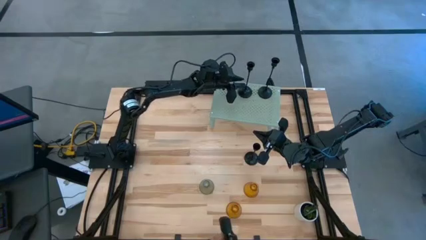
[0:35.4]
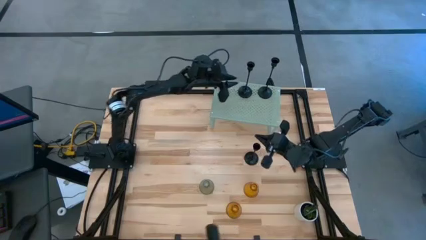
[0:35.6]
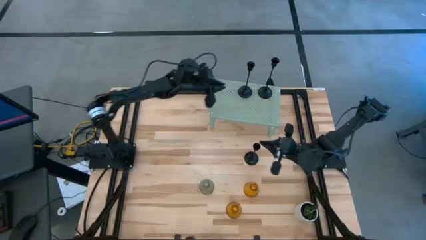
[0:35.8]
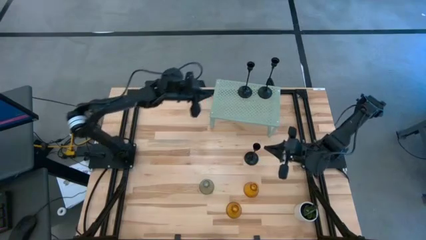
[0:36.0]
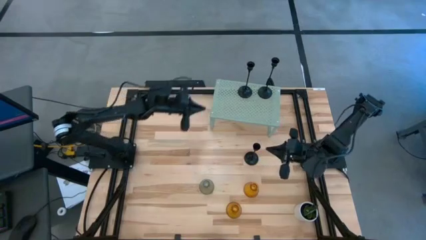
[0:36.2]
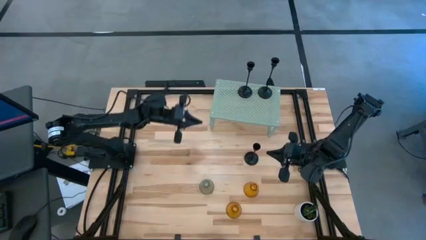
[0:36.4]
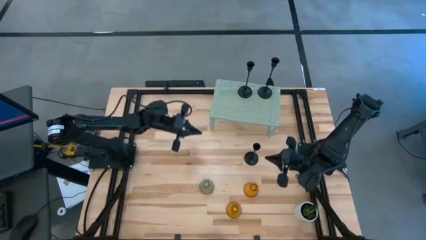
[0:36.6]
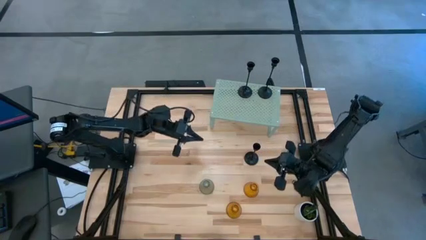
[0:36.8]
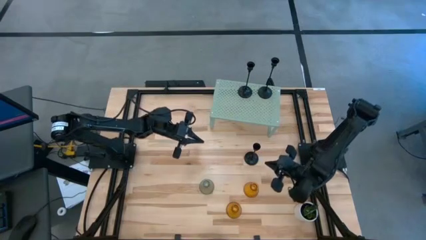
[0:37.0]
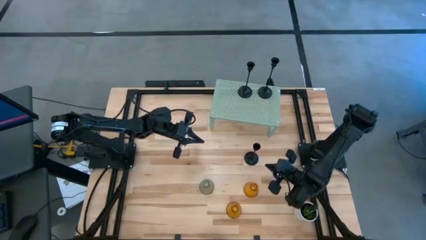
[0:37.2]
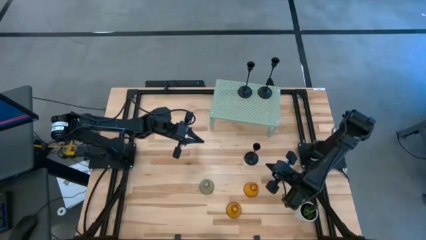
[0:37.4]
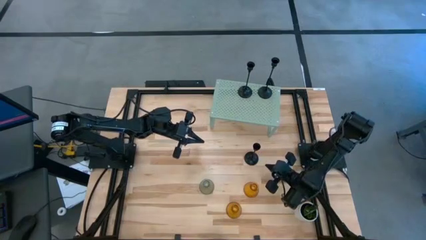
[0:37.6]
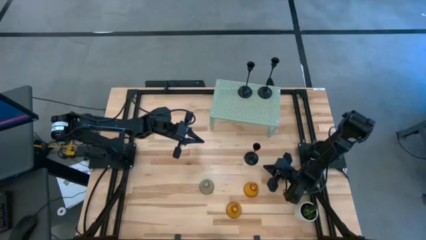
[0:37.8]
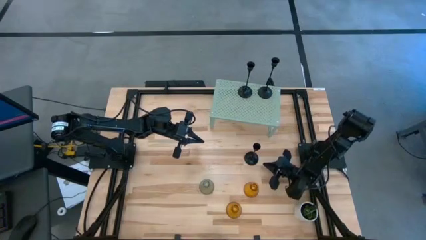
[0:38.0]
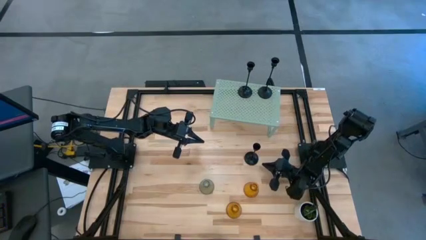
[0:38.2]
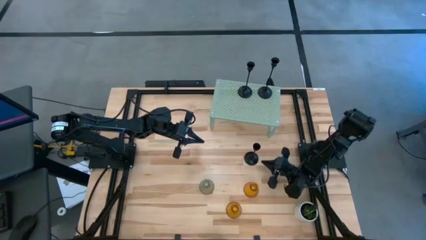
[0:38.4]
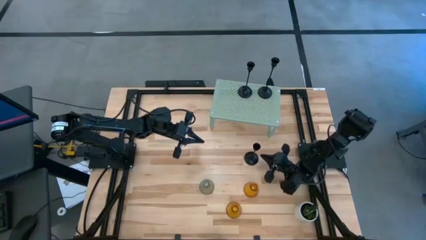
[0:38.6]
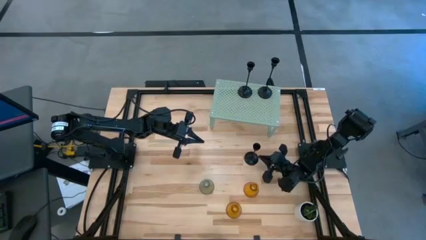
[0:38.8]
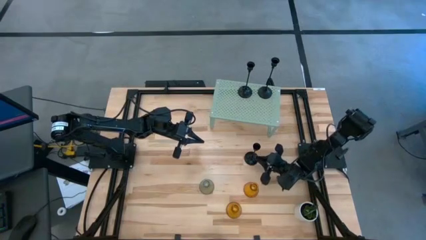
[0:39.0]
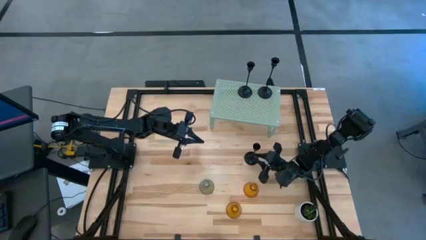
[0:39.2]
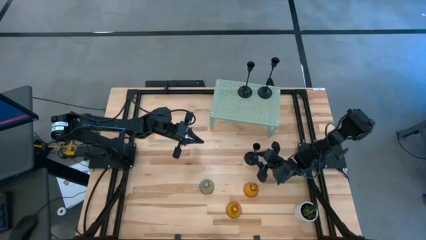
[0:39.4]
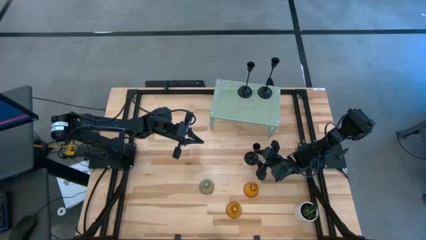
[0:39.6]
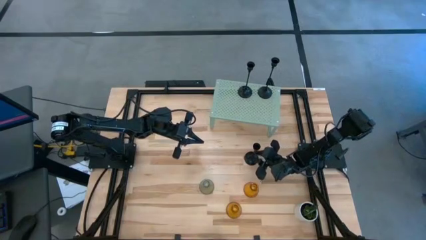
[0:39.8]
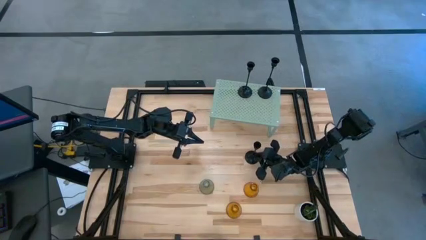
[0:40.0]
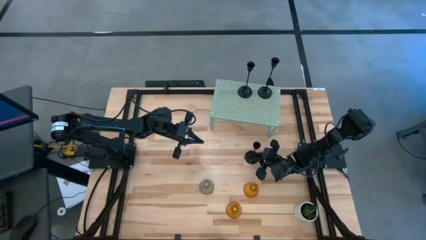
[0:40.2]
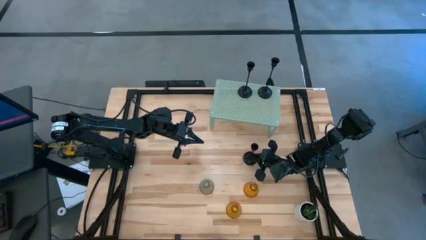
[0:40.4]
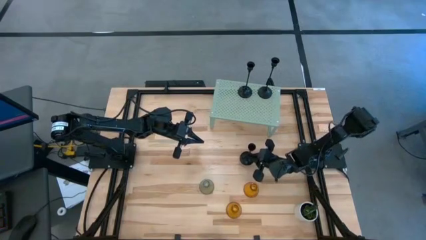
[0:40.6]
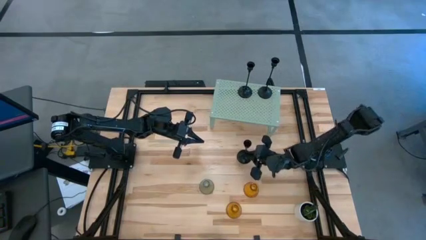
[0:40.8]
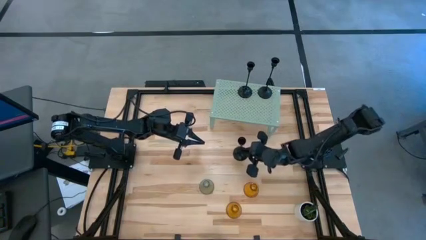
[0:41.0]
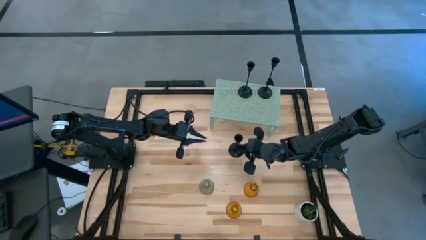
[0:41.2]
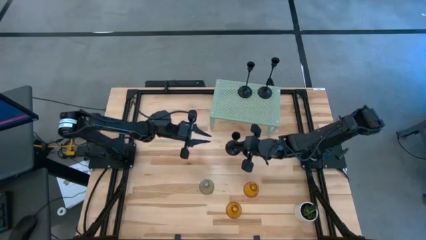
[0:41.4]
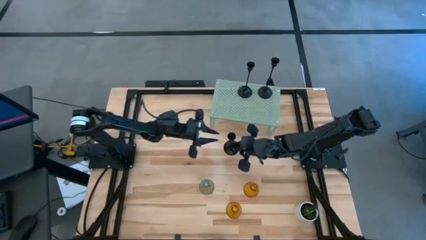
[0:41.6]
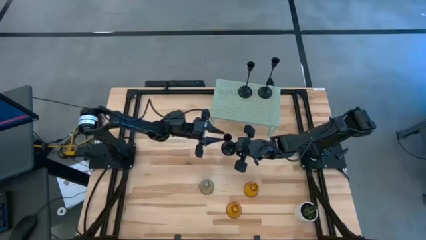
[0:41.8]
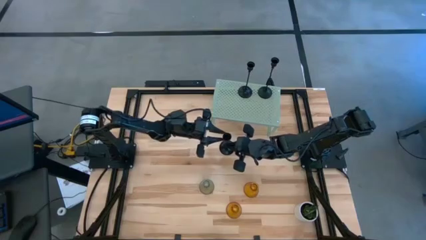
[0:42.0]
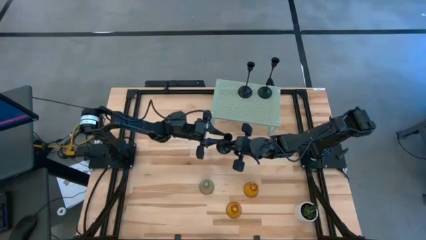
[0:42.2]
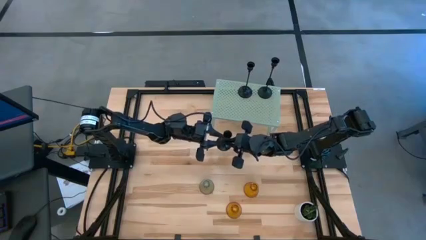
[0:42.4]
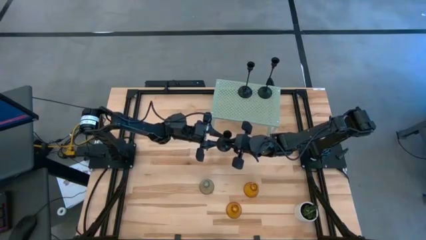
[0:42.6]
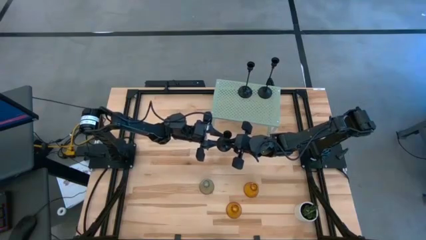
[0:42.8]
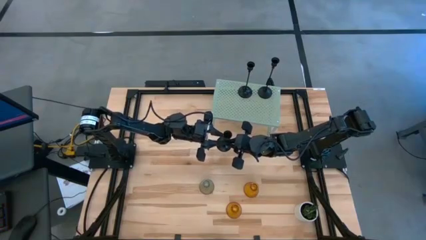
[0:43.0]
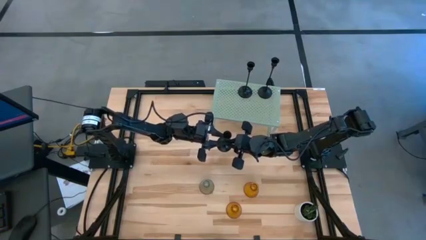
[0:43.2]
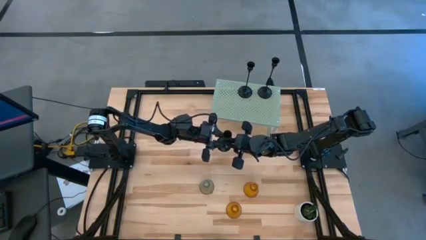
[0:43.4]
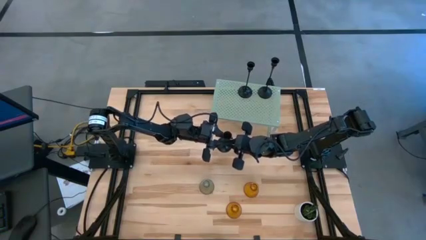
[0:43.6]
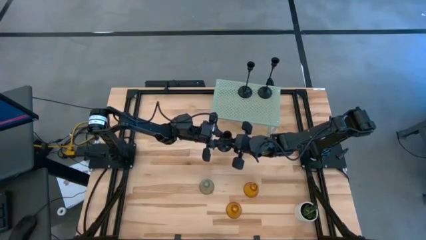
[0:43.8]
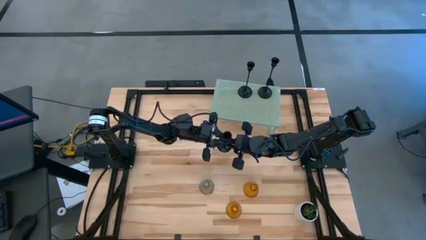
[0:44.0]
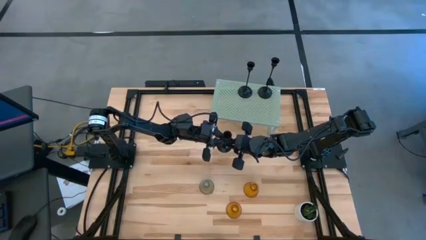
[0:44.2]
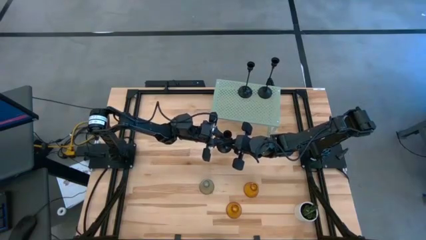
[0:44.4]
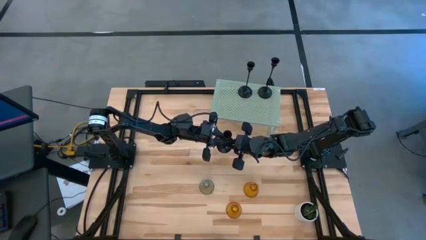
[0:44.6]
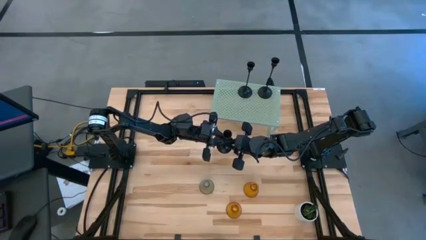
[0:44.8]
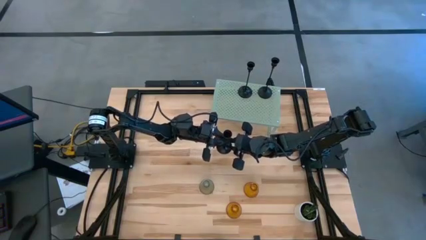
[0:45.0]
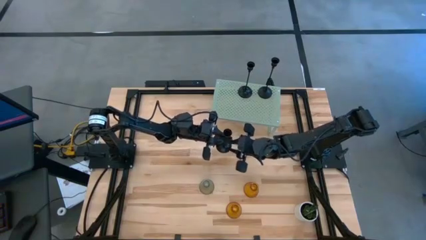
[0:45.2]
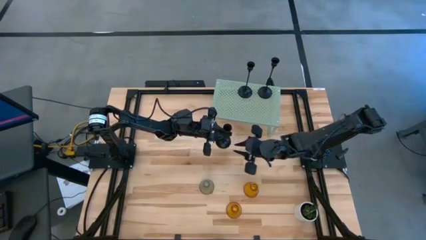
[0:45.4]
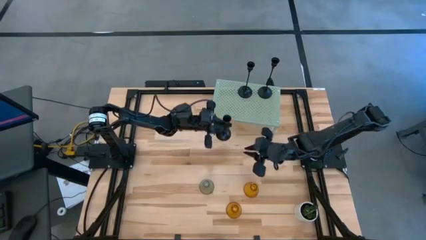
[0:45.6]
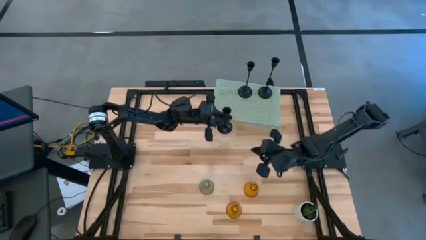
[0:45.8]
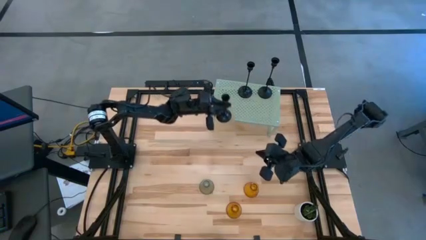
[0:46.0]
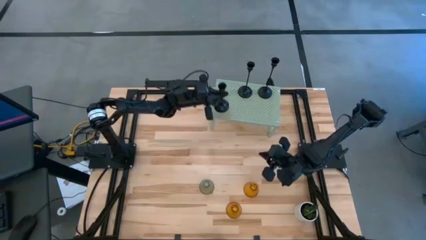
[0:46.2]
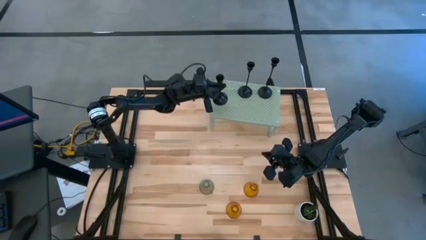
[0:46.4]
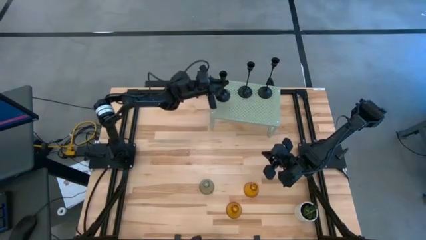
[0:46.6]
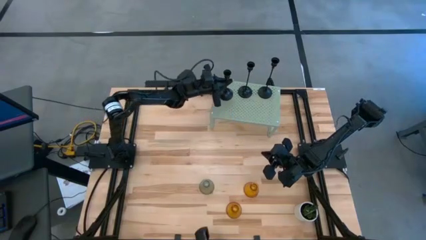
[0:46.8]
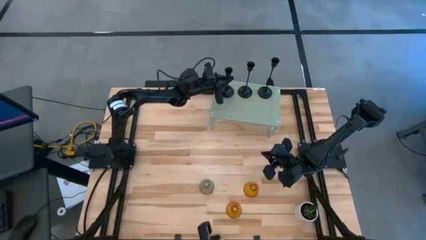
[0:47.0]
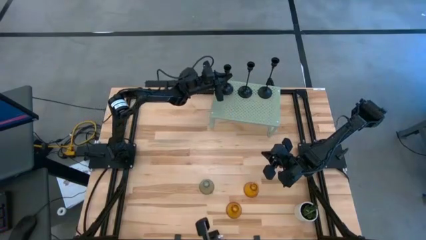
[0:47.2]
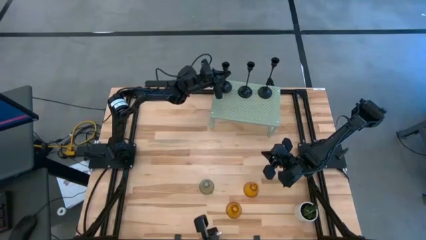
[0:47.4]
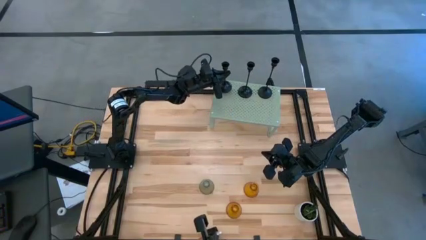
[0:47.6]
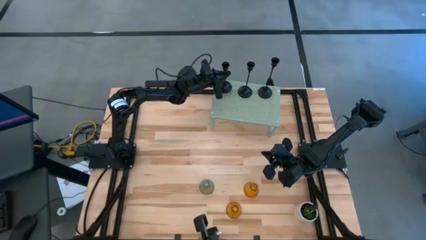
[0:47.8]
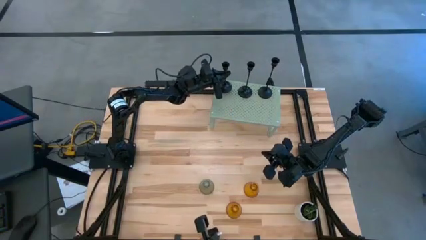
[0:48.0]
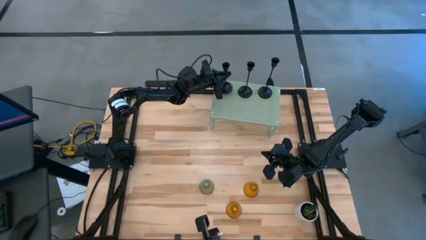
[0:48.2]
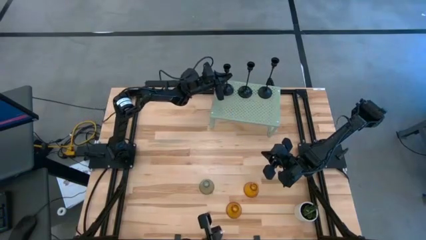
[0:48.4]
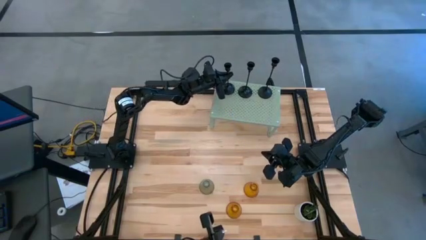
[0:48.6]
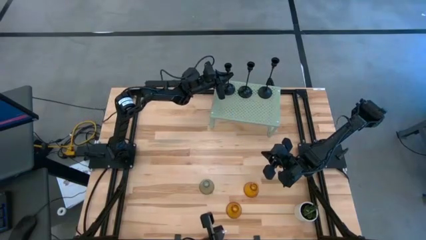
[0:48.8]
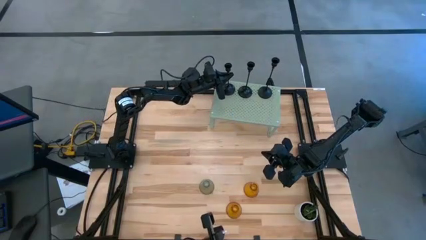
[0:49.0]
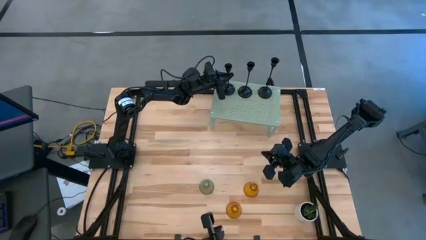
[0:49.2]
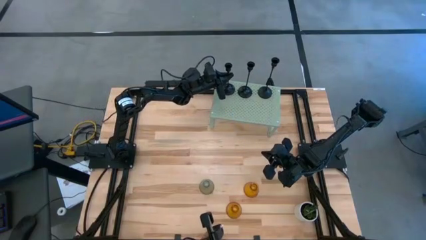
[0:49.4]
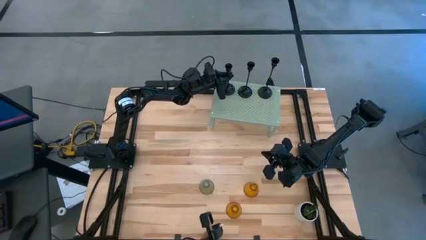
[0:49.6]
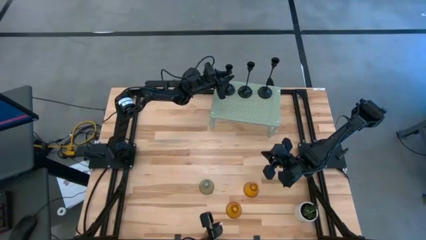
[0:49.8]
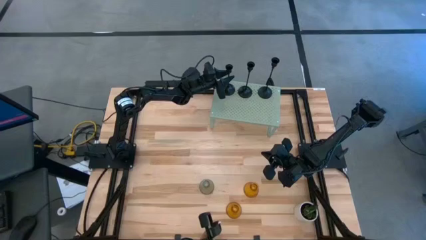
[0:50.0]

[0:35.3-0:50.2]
Task: Pick & Place candle stick holders
Put the top right black candle holder on the shelf
